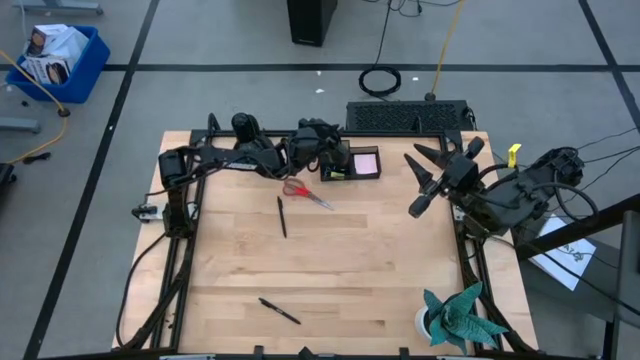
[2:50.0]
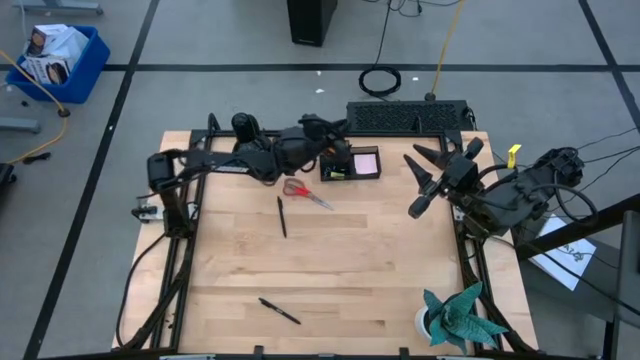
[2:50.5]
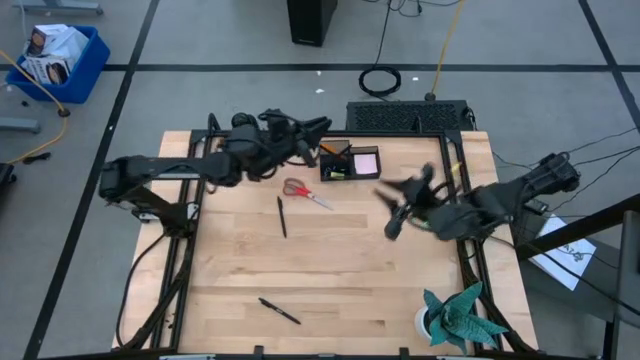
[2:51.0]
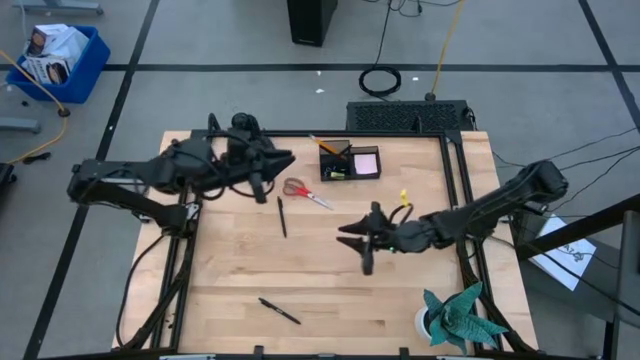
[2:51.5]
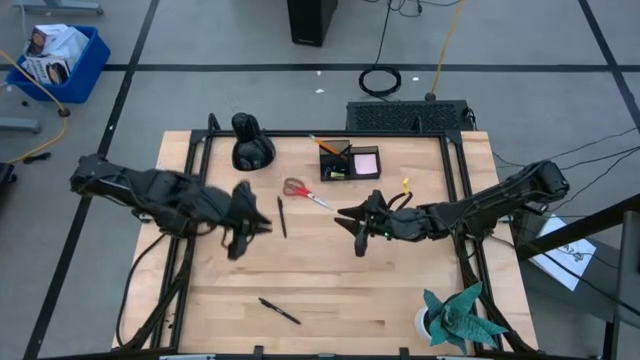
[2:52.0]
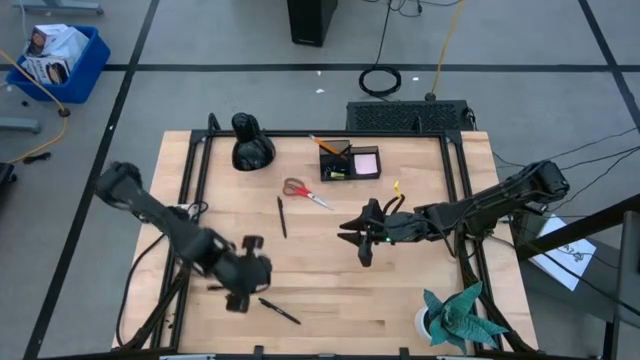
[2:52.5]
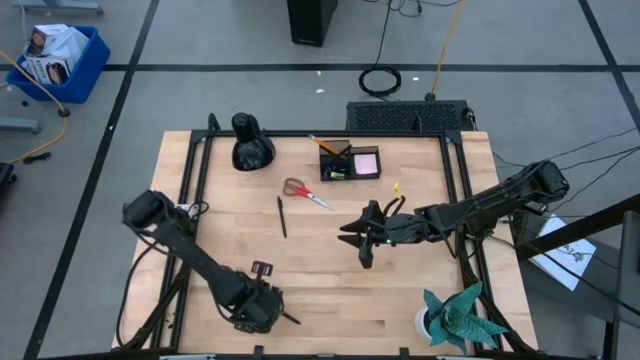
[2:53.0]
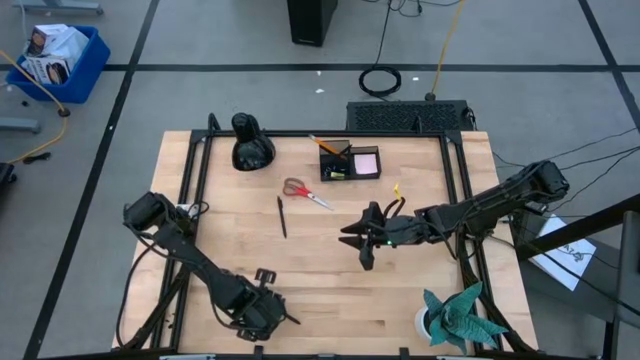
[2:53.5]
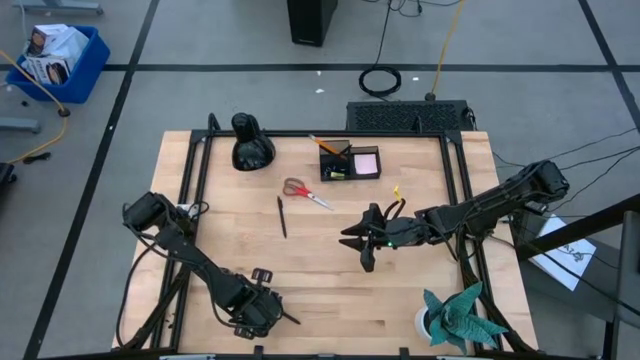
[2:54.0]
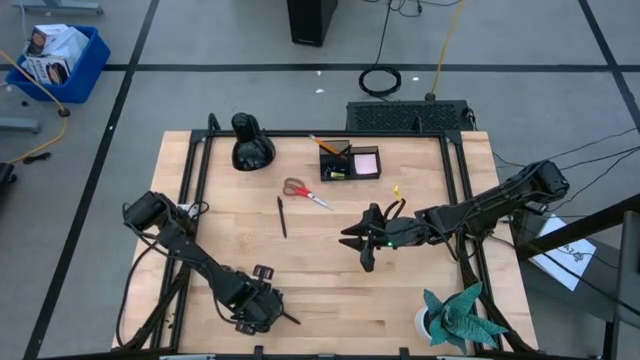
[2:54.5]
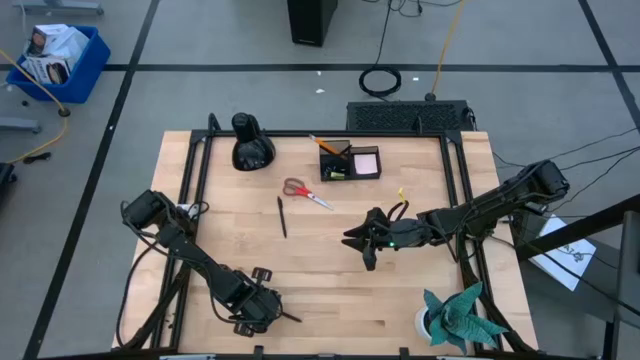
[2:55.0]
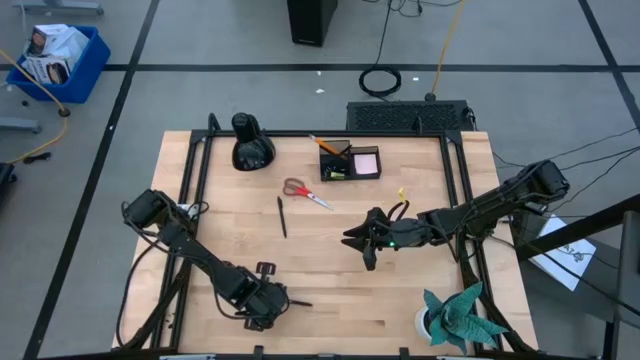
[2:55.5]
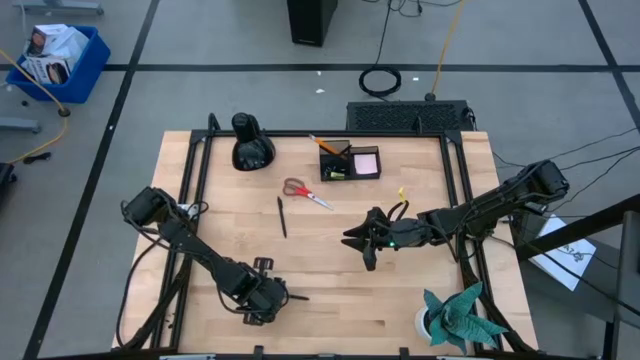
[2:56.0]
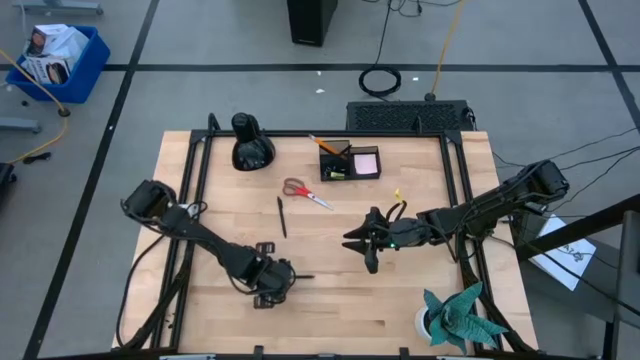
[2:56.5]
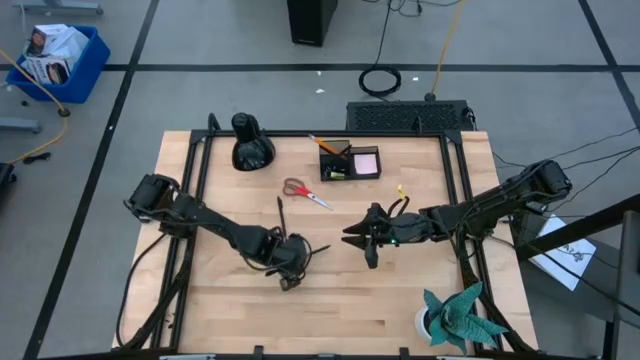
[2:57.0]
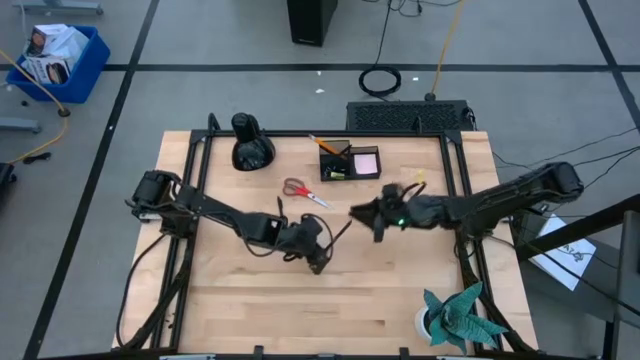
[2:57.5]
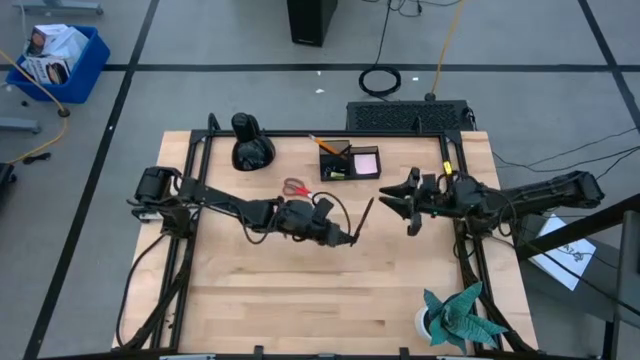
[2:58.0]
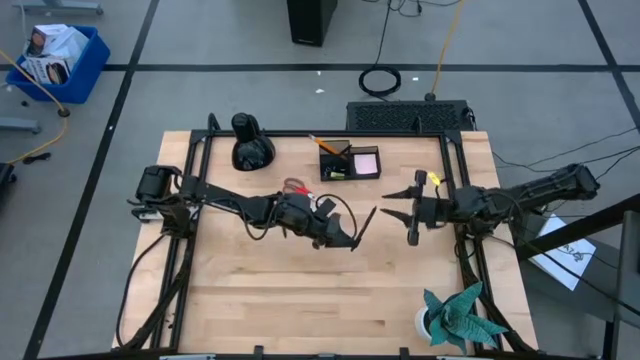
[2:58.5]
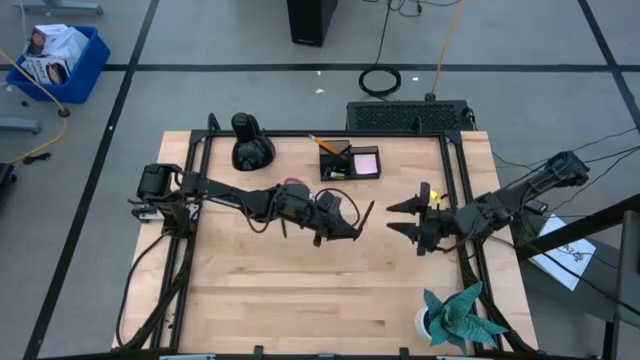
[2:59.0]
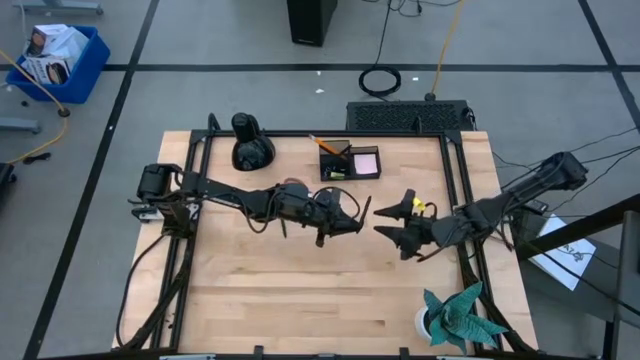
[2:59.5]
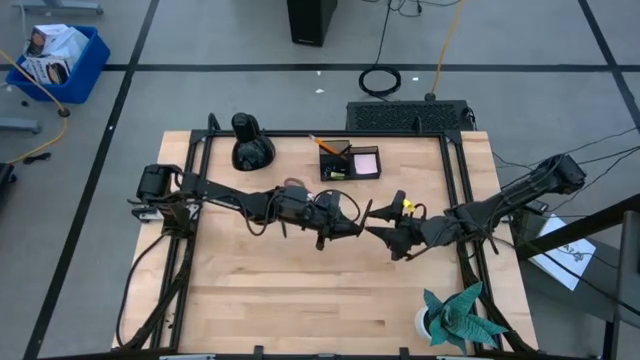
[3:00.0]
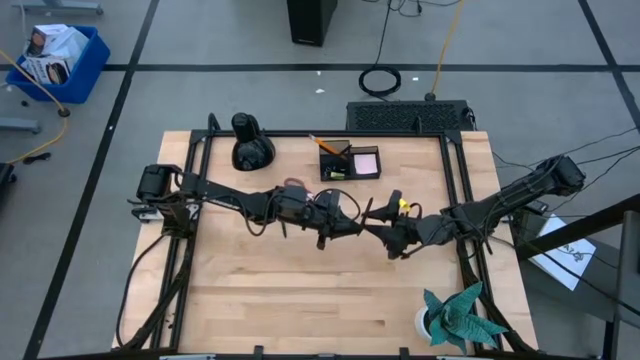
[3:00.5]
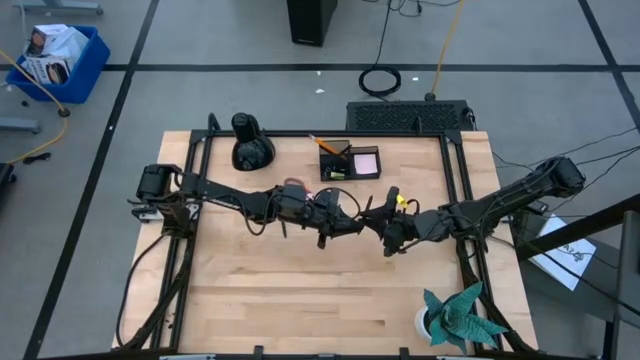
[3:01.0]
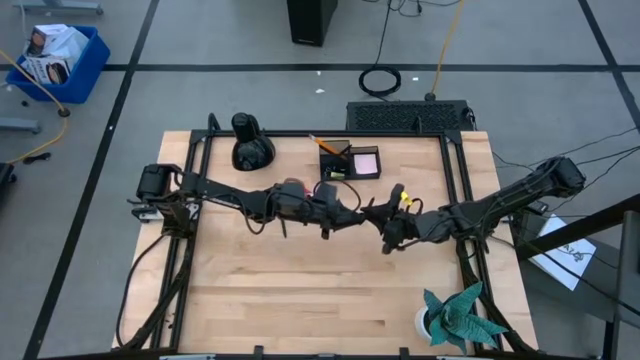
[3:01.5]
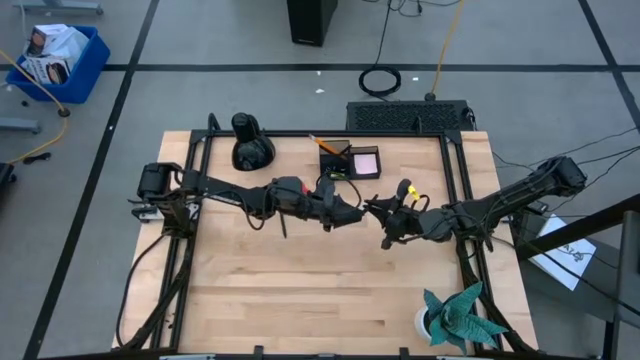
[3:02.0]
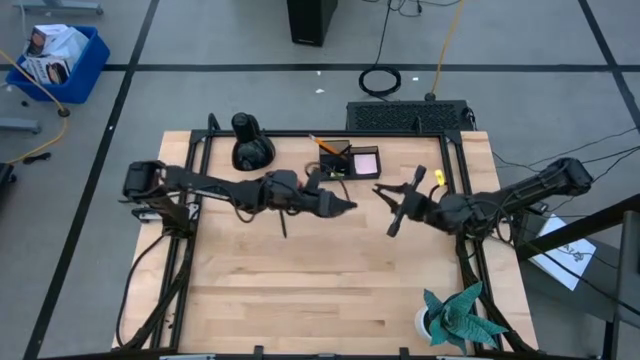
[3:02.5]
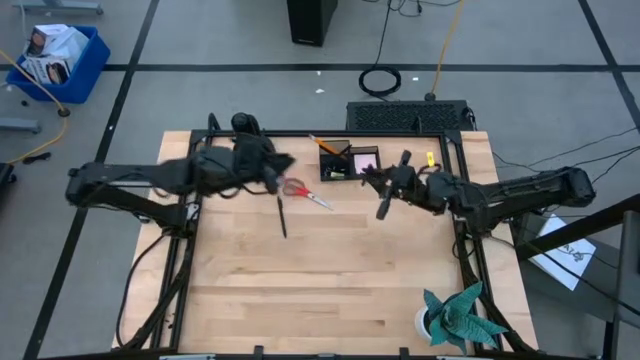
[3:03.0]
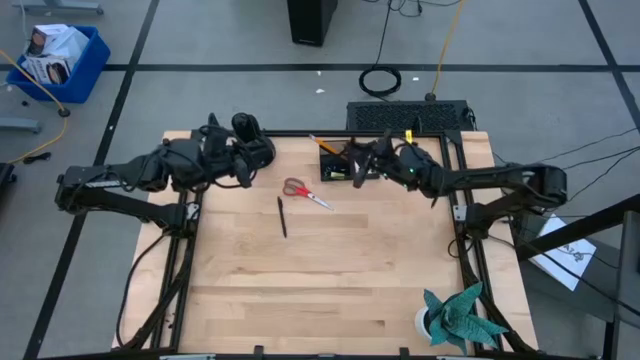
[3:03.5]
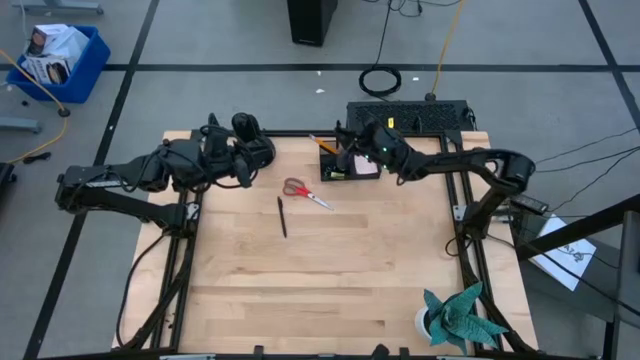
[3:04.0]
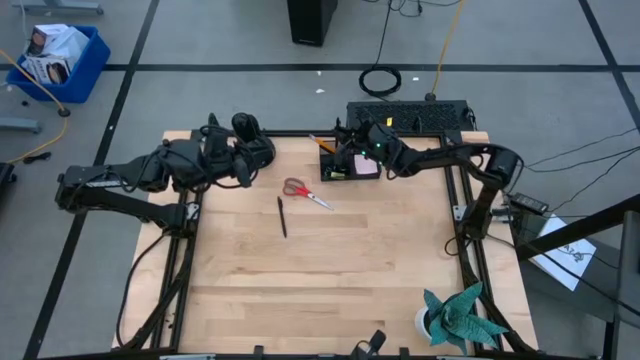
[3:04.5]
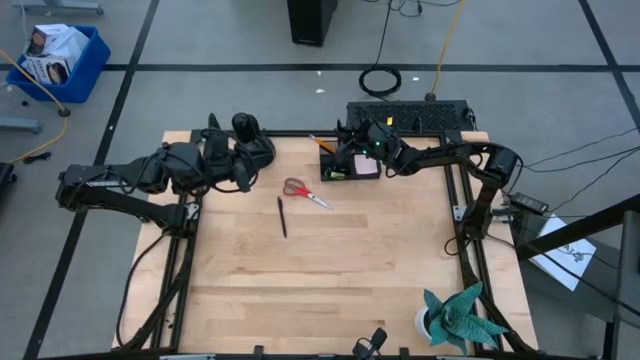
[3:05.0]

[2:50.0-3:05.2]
Task: Pick and place office supplies into organizer
Put the black pen into the black desk organizer

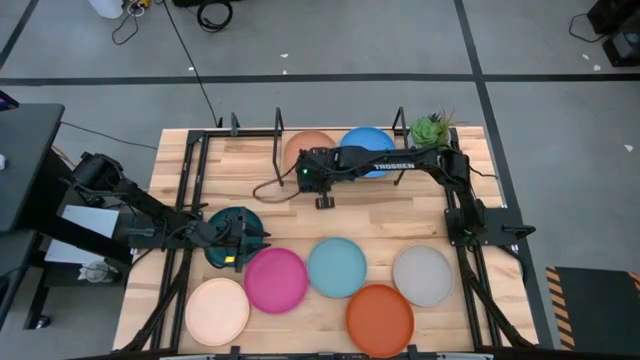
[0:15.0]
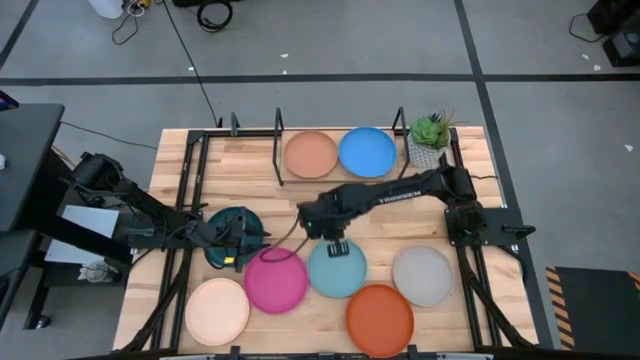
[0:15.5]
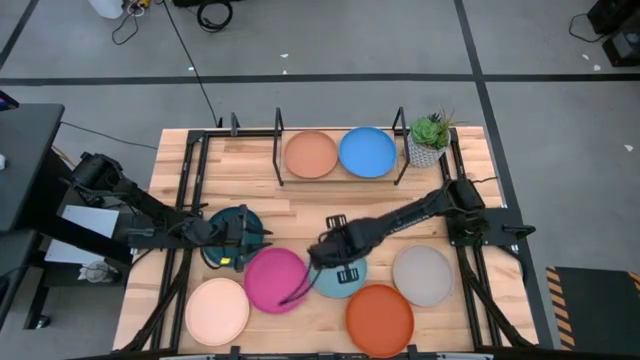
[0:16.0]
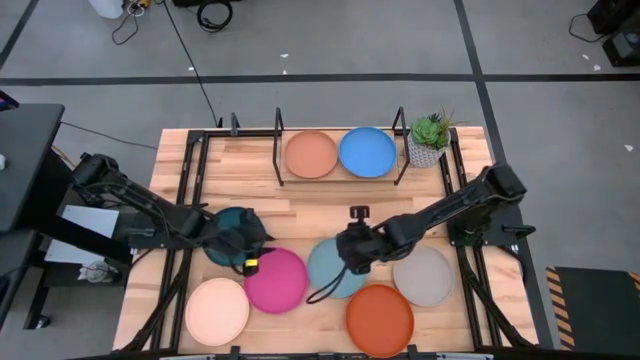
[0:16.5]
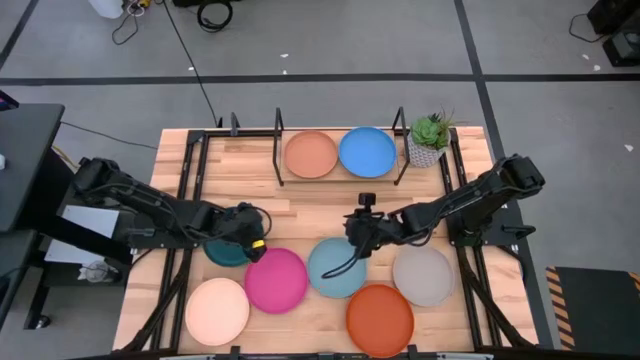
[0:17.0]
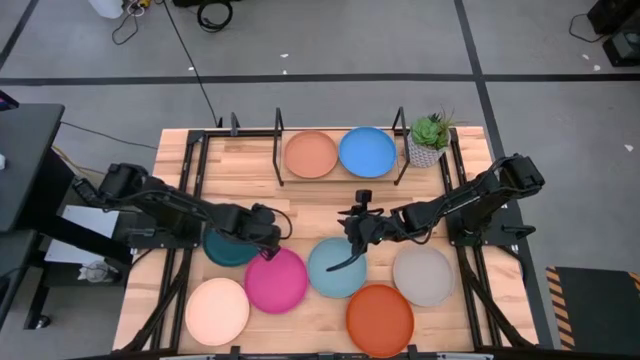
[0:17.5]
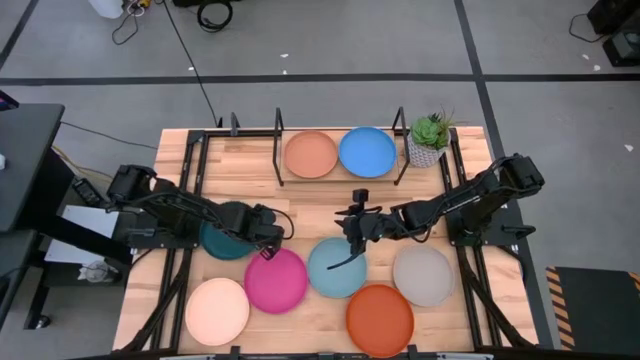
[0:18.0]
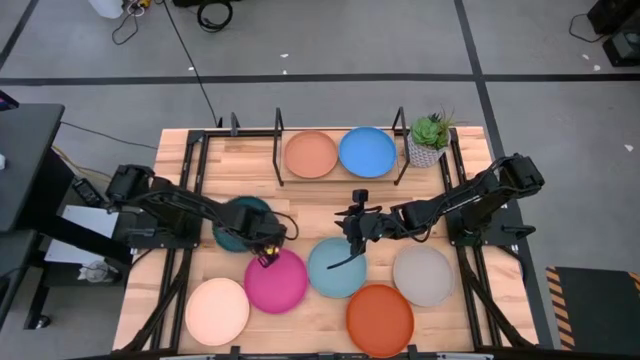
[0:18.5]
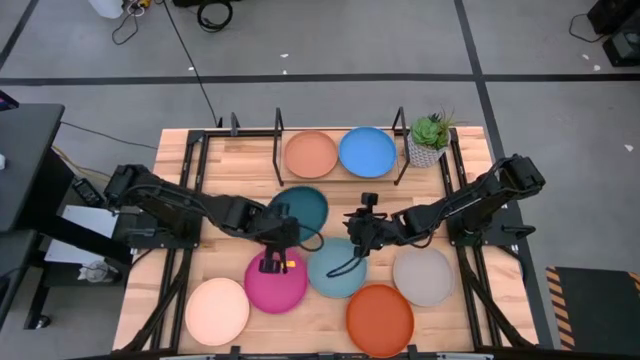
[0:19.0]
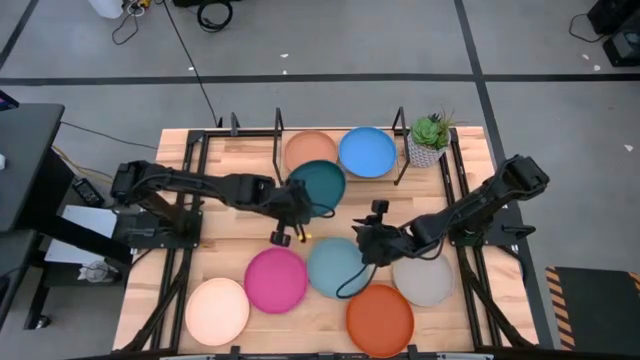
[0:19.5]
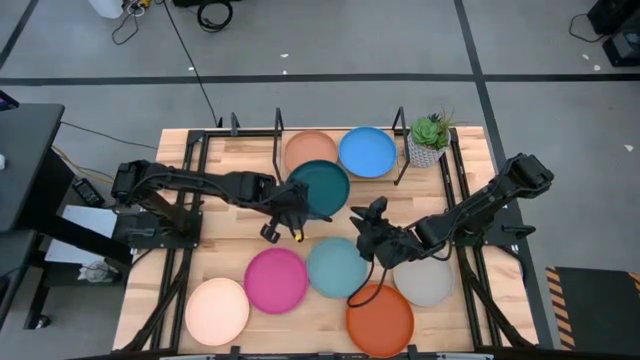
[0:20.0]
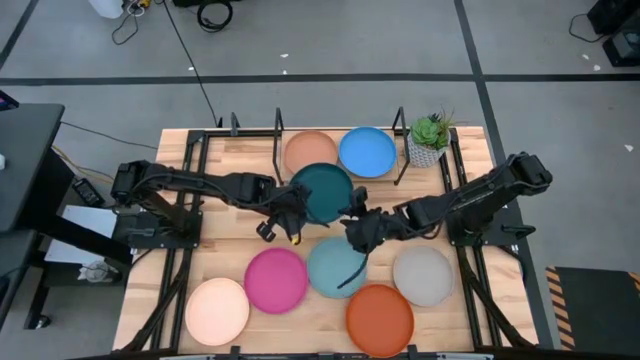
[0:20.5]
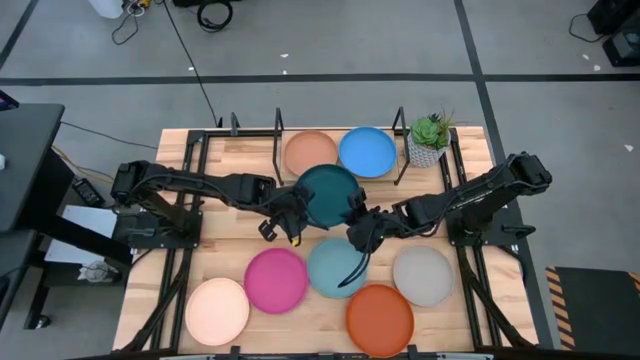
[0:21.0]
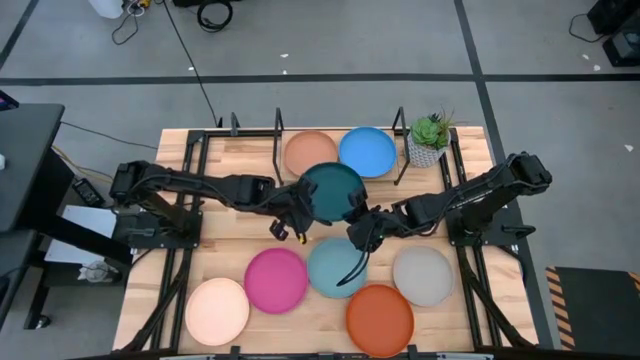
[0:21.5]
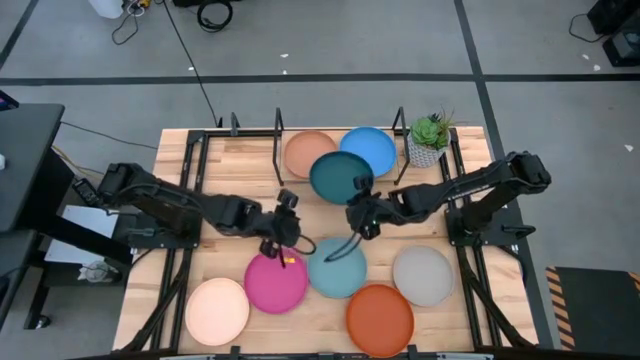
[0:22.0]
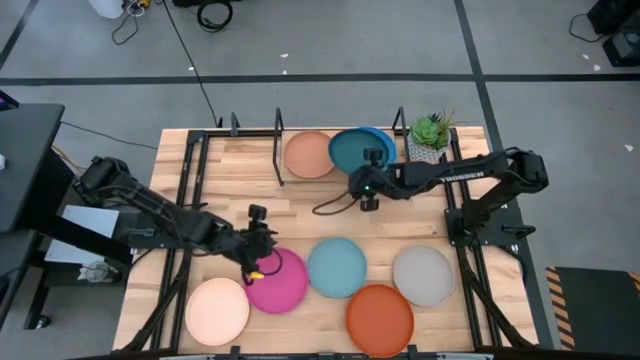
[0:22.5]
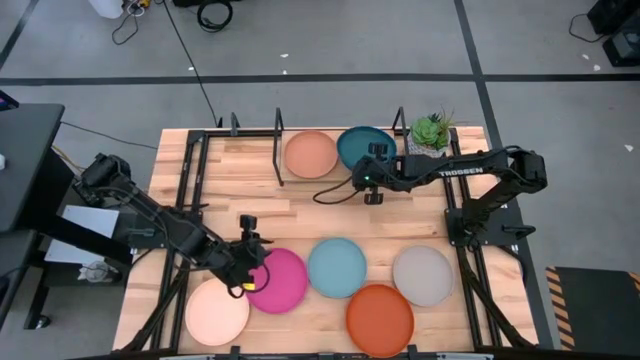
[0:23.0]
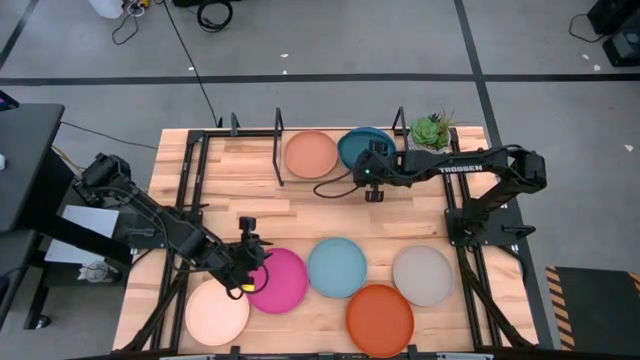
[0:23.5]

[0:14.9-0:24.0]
Task: Place and stack plates onto a shelf
Stack the green plate on top of the violet plate on the shelf
